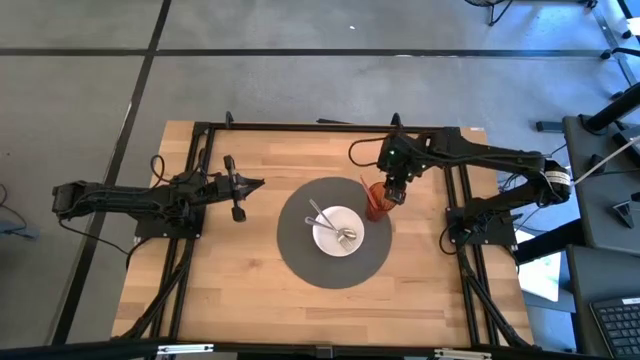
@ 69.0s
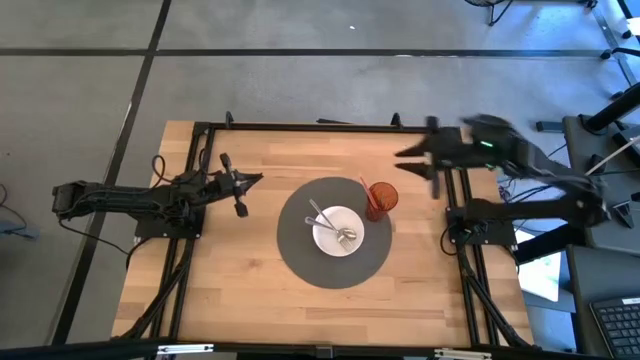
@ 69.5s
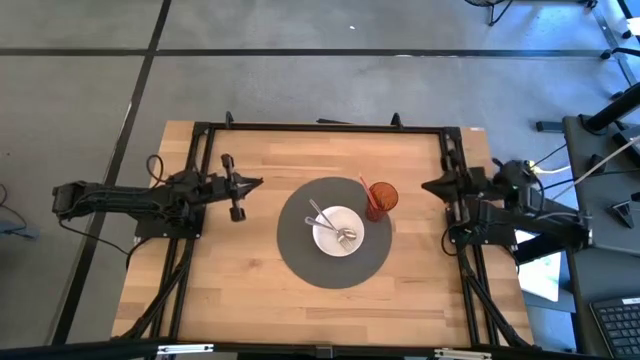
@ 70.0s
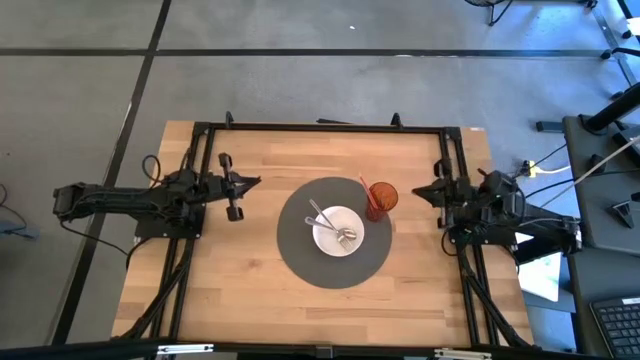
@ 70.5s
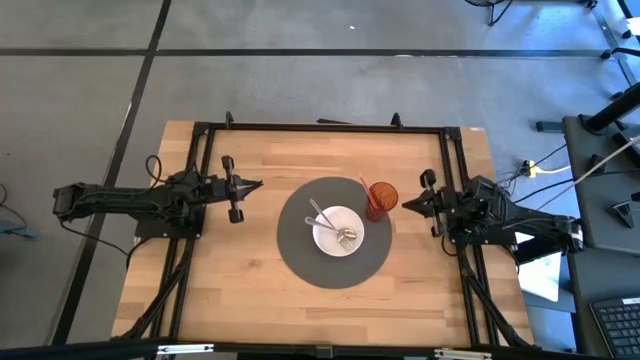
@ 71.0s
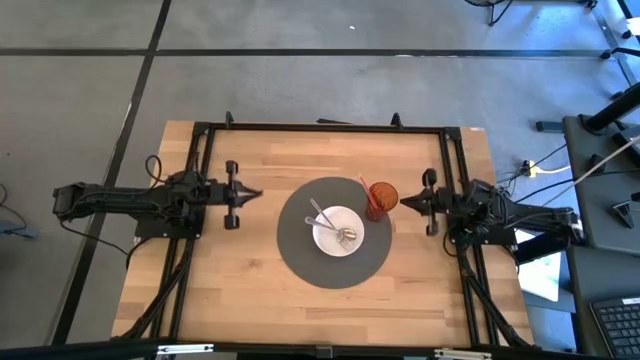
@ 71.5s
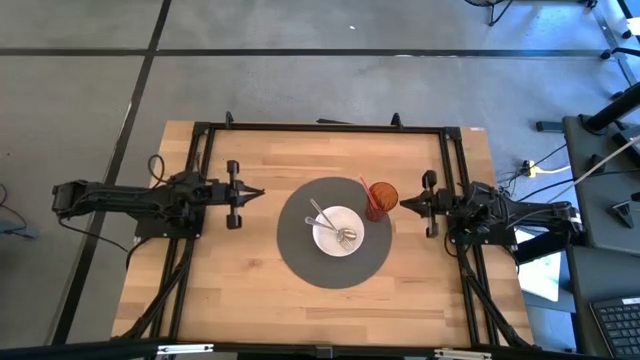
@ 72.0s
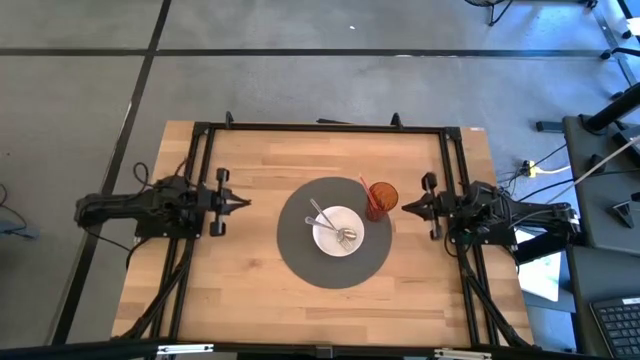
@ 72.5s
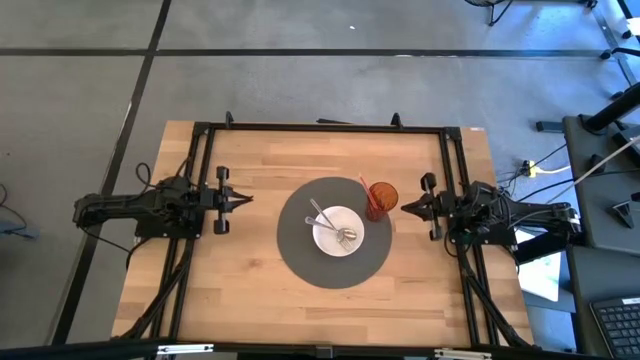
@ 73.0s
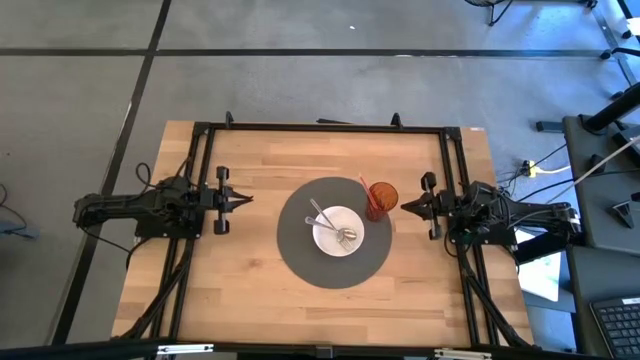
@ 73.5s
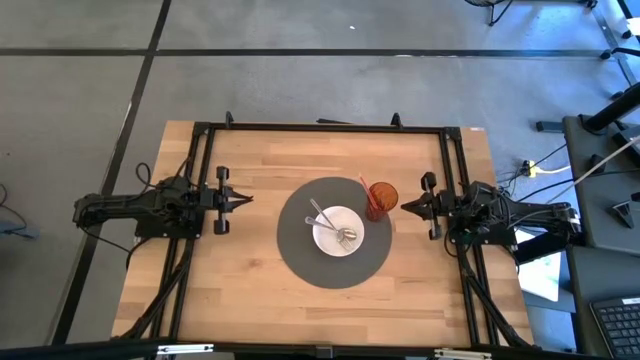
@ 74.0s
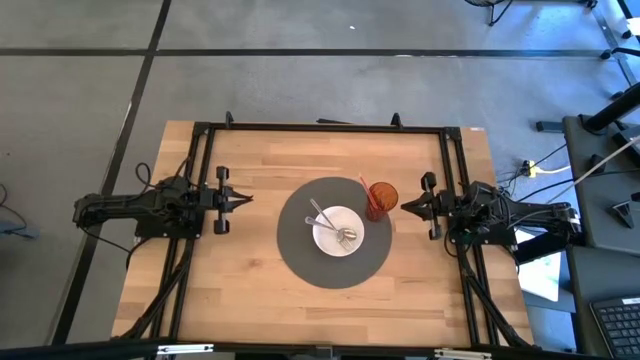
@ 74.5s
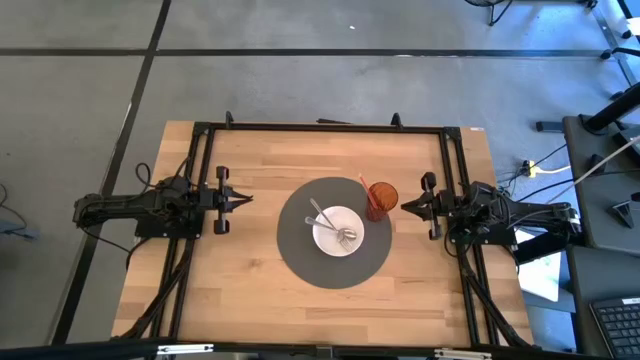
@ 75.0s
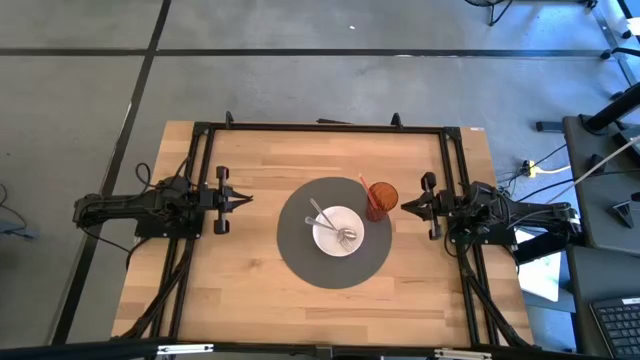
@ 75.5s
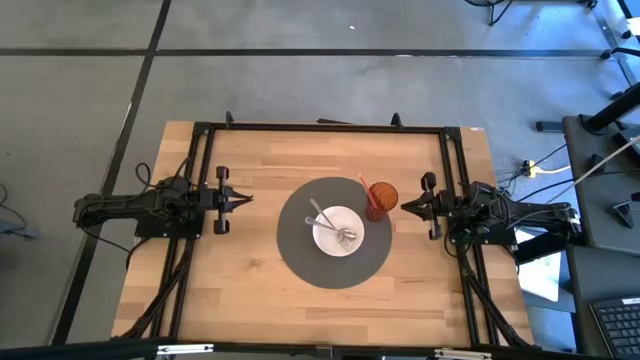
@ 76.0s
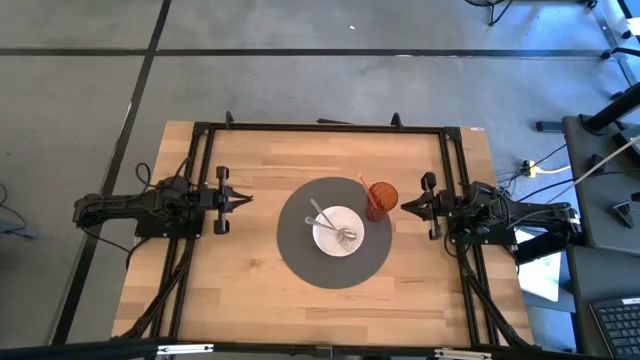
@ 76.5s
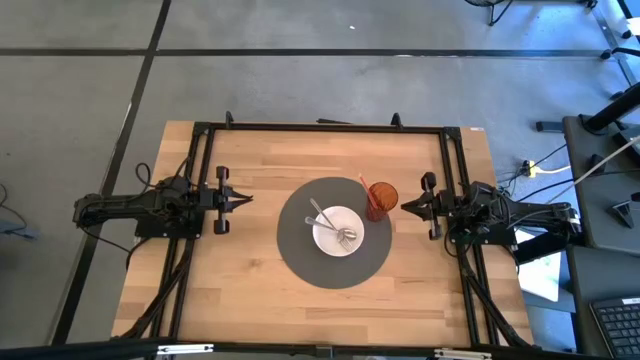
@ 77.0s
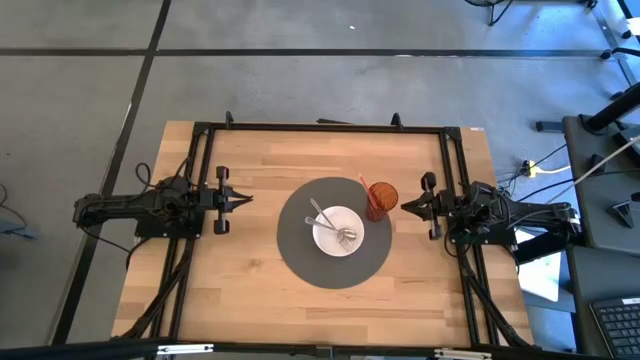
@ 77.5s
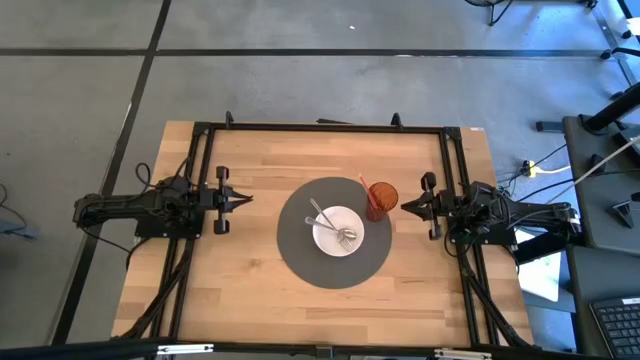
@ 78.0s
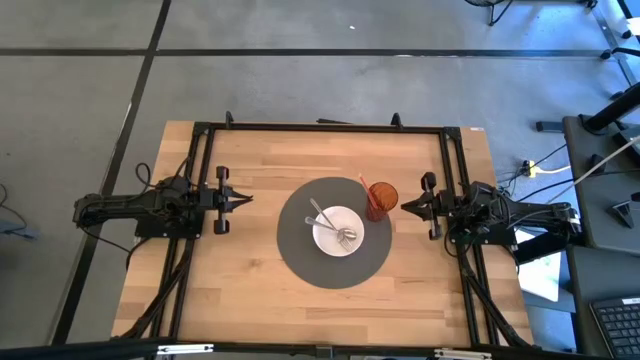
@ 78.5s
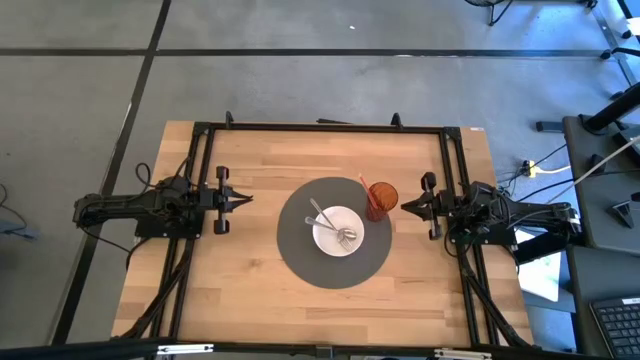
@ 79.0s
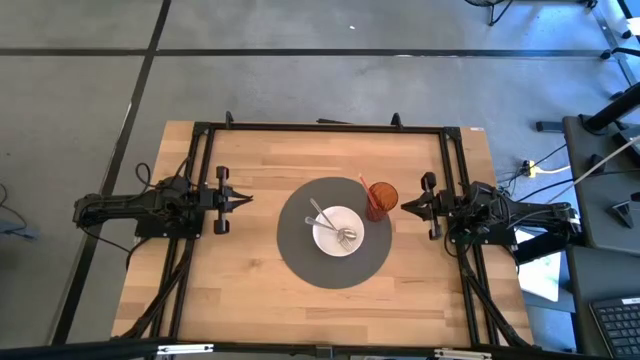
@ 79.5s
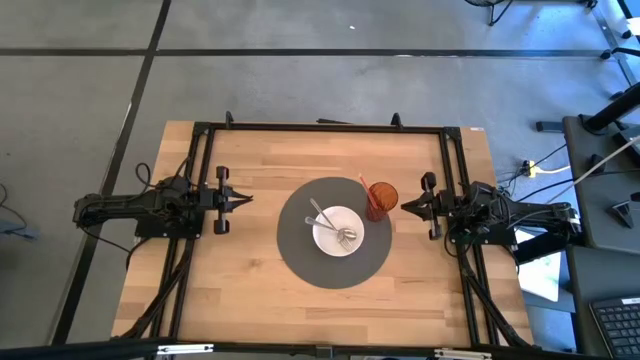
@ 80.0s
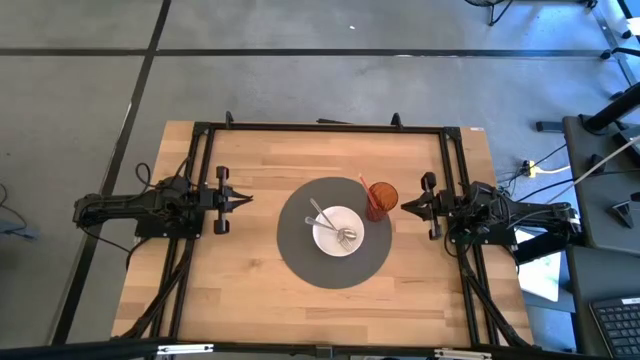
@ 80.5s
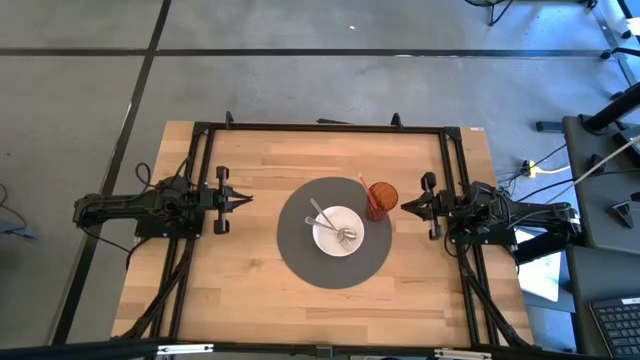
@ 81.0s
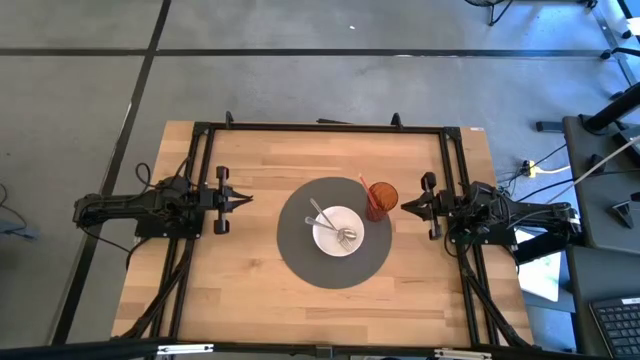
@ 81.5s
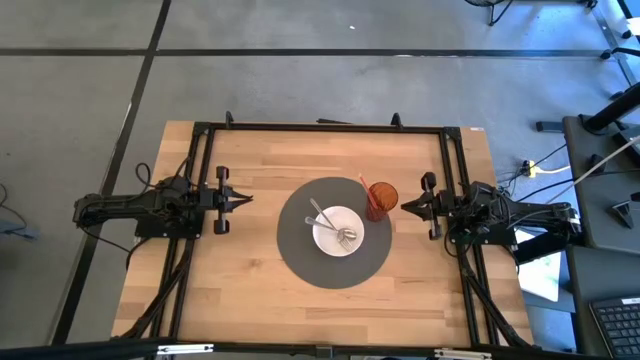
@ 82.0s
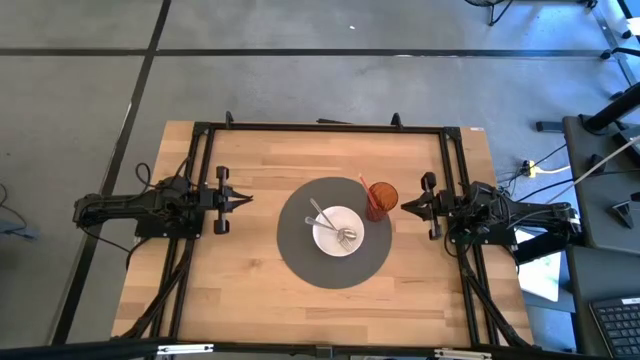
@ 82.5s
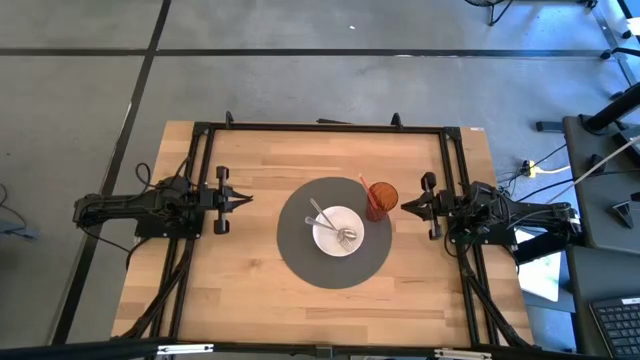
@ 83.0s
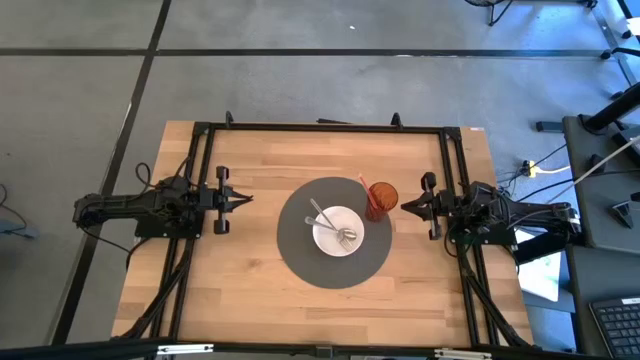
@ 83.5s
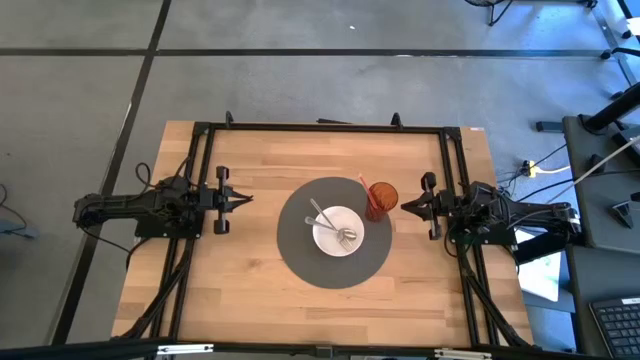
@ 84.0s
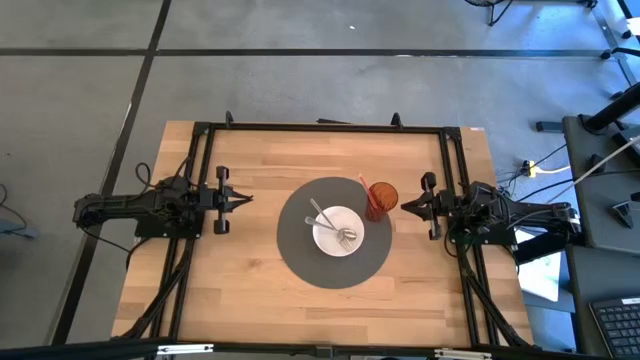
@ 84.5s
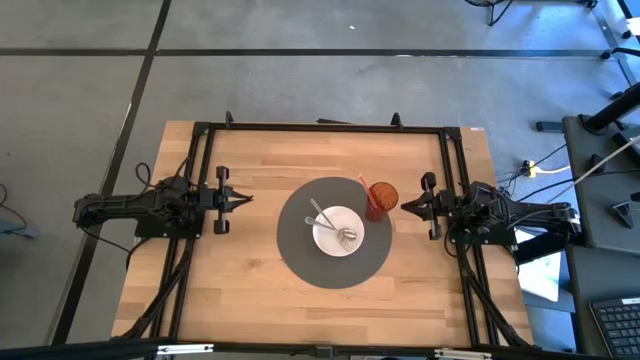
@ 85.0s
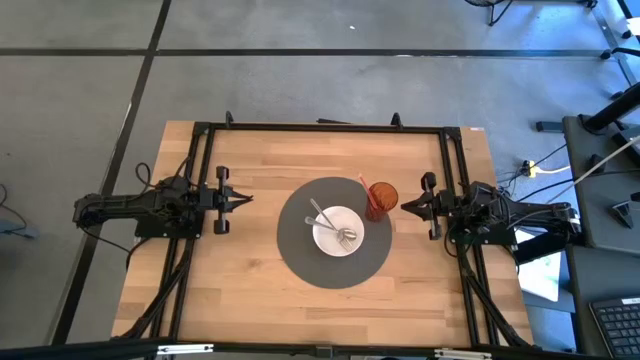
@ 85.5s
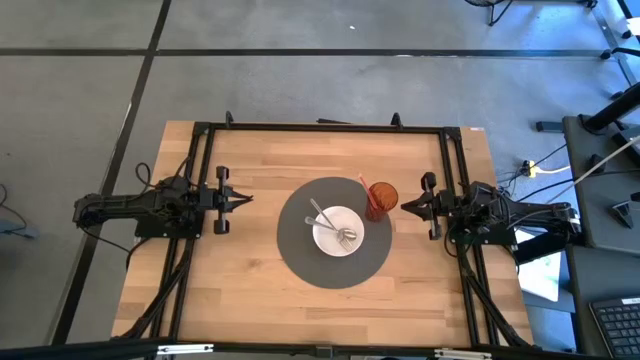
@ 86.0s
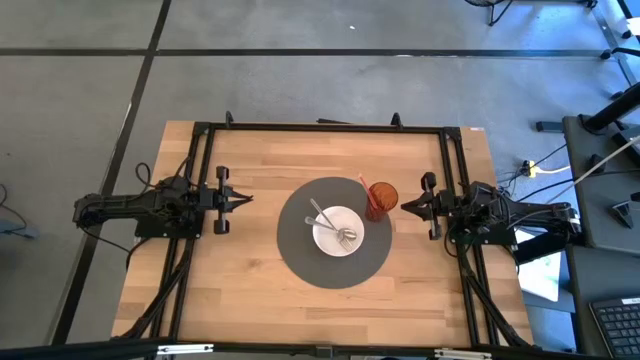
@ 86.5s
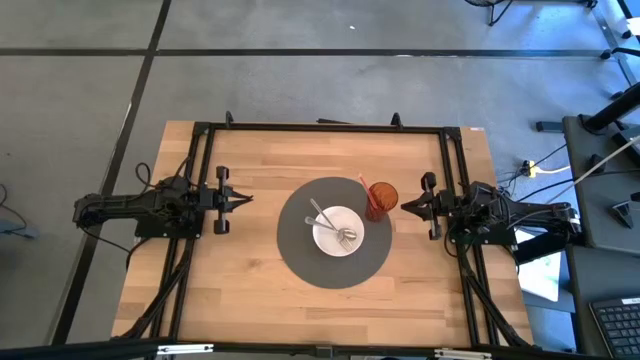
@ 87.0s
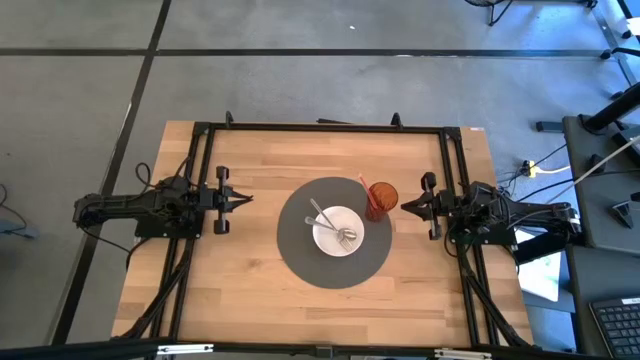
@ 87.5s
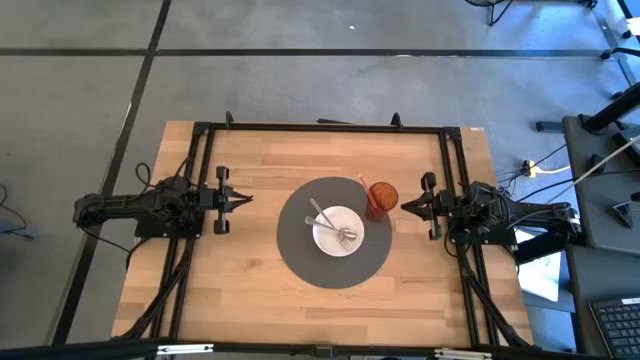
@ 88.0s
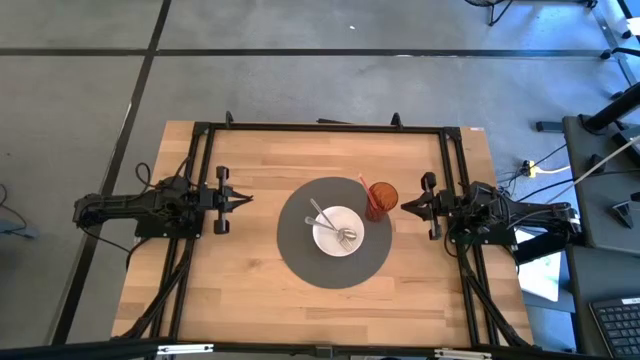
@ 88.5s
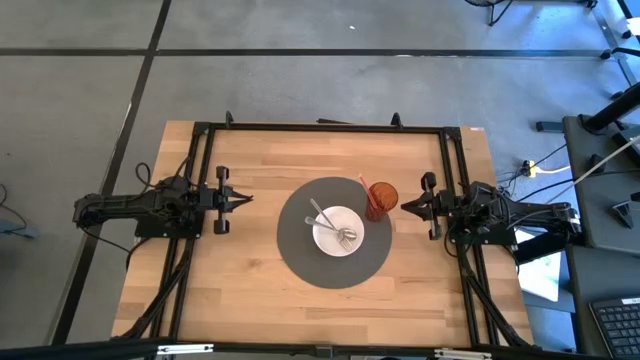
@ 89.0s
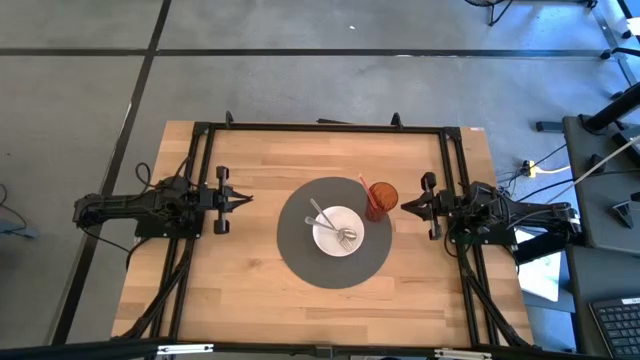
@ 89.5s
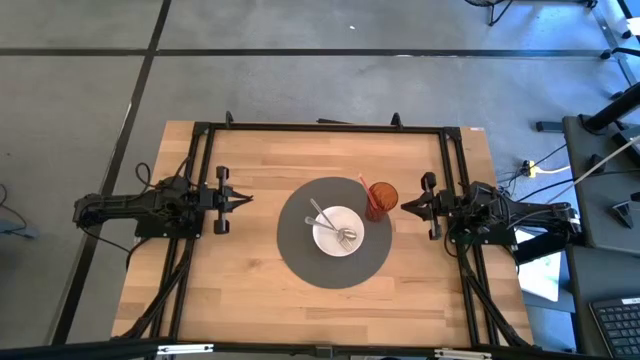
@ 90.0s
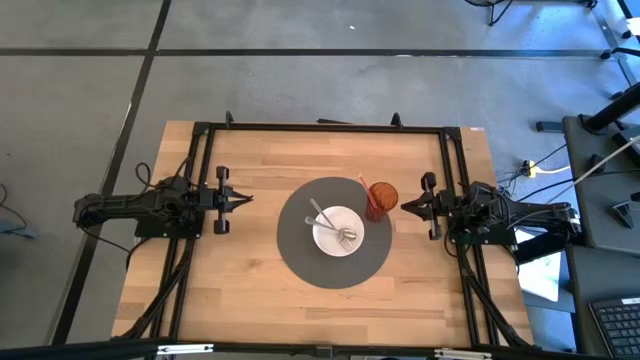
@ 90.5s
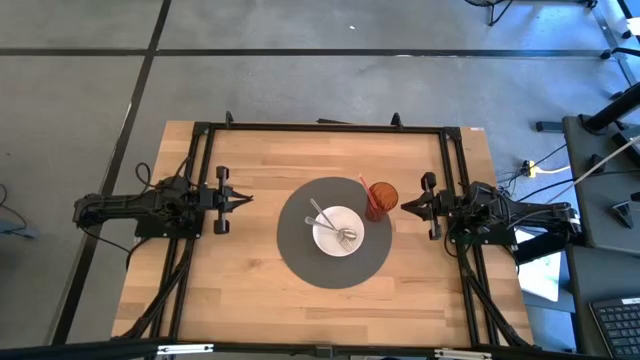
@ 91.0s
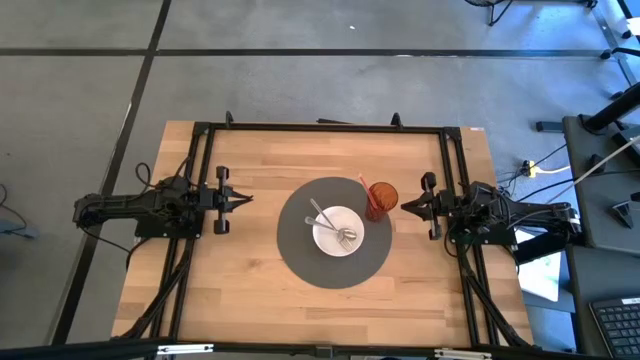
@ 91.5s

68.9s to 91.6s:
Task: Pick & Place Utensil
Return to Home Position
